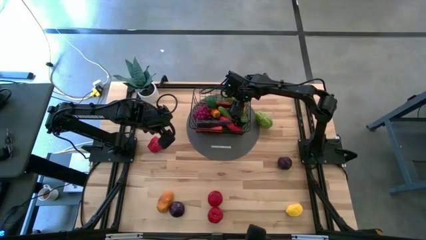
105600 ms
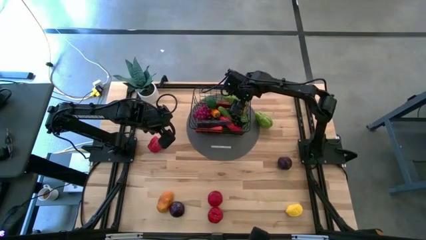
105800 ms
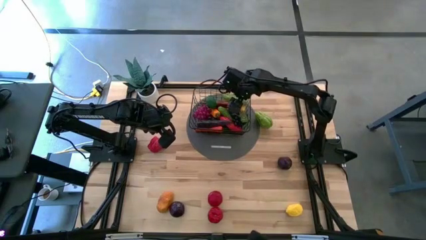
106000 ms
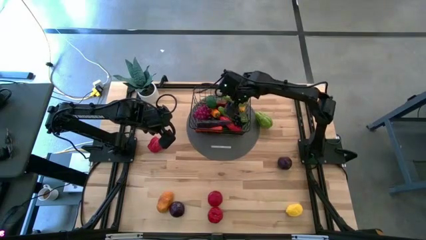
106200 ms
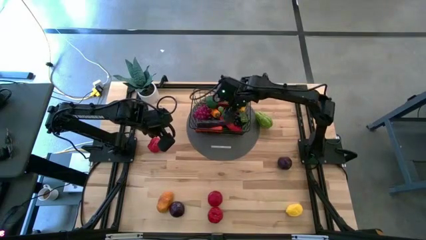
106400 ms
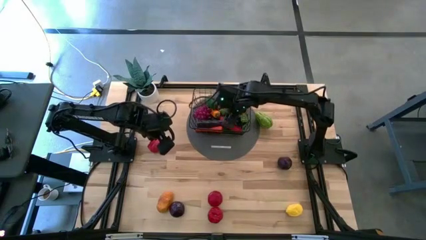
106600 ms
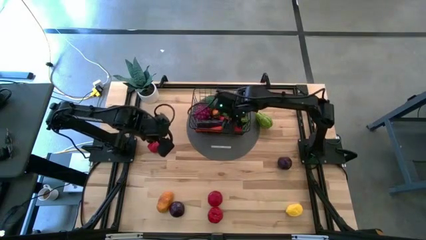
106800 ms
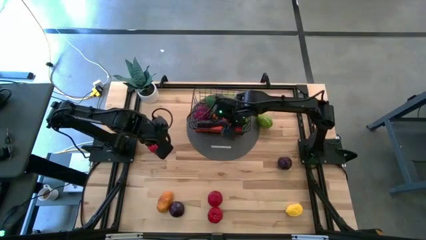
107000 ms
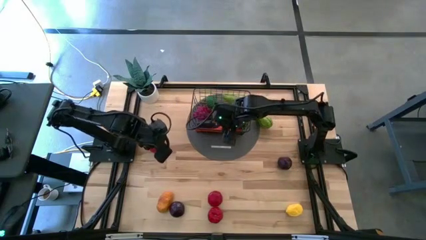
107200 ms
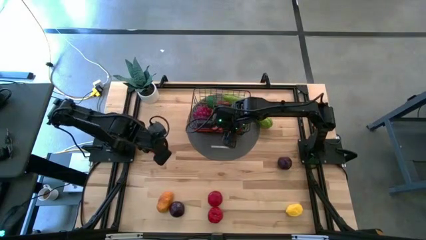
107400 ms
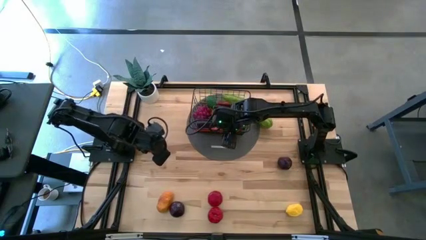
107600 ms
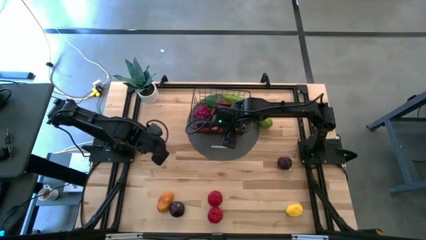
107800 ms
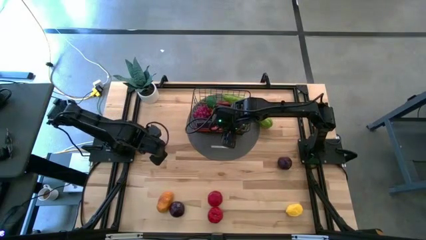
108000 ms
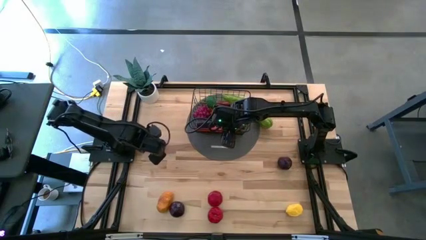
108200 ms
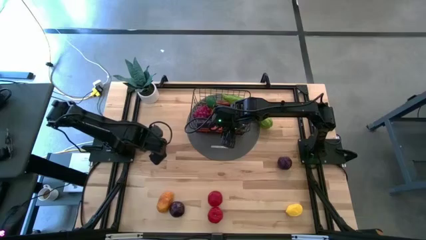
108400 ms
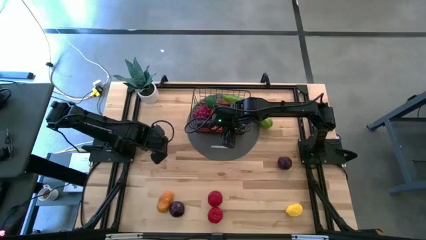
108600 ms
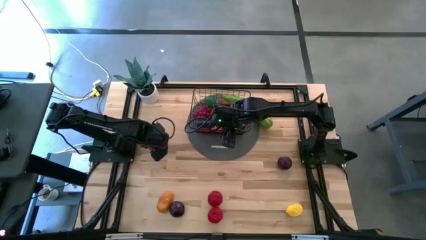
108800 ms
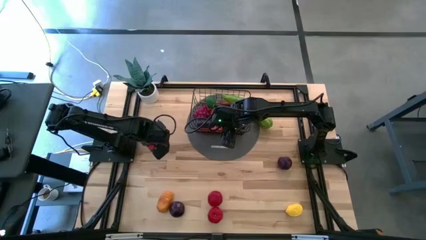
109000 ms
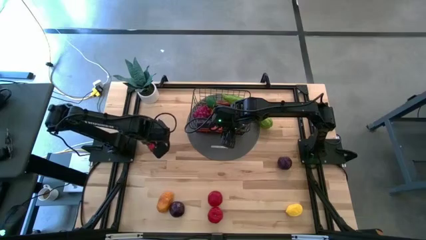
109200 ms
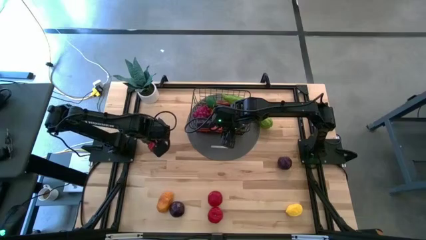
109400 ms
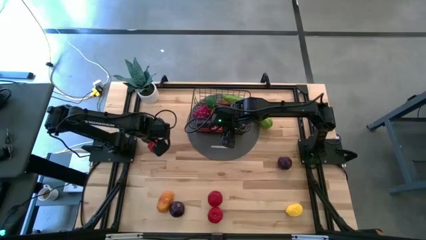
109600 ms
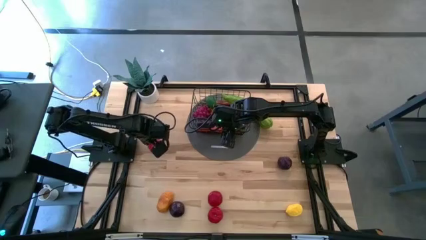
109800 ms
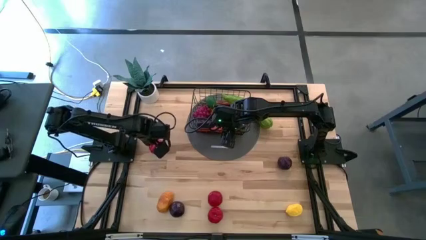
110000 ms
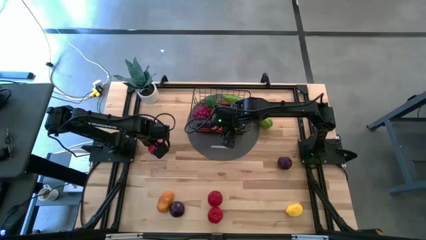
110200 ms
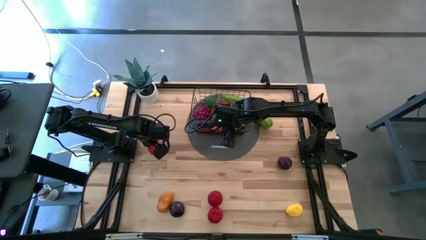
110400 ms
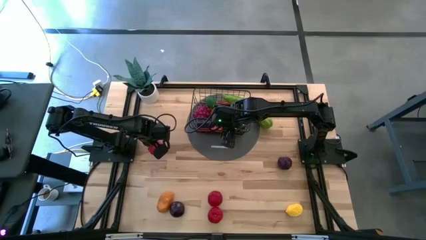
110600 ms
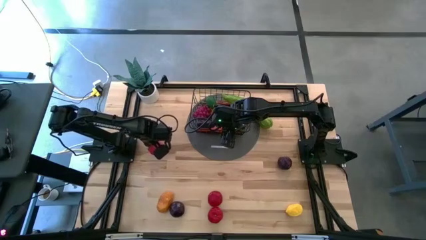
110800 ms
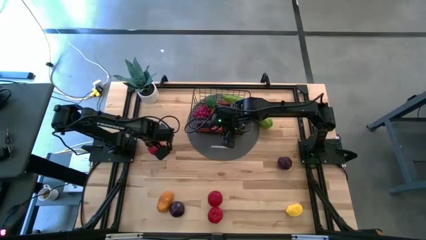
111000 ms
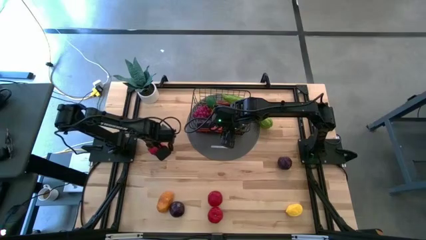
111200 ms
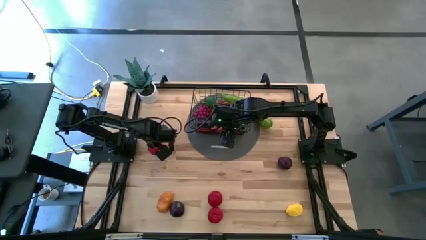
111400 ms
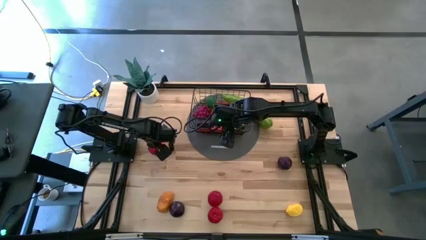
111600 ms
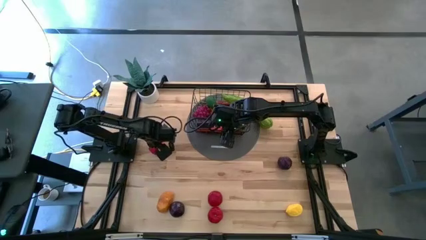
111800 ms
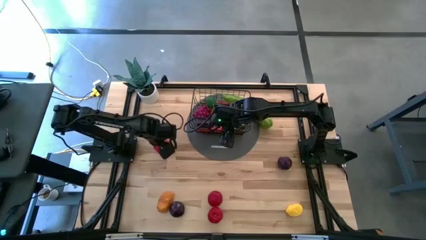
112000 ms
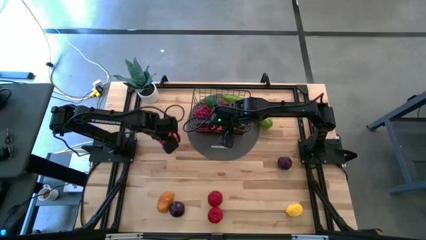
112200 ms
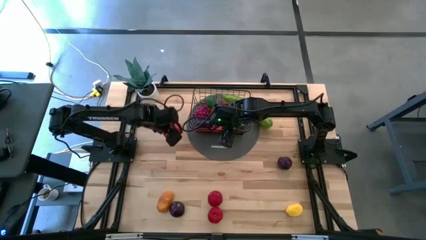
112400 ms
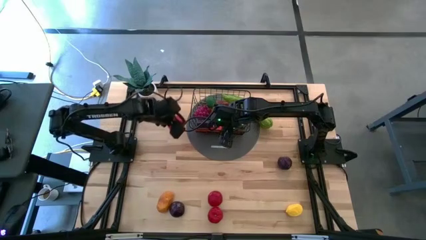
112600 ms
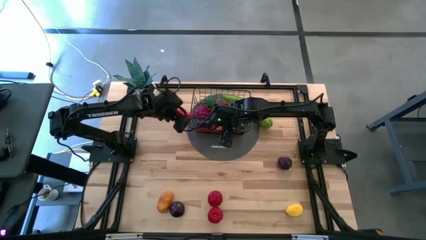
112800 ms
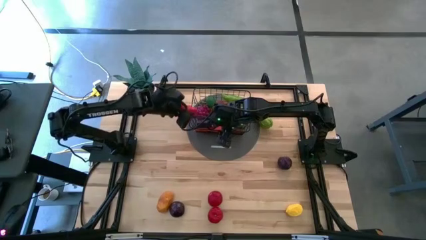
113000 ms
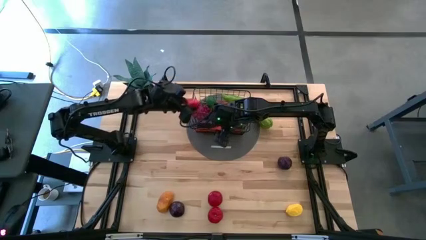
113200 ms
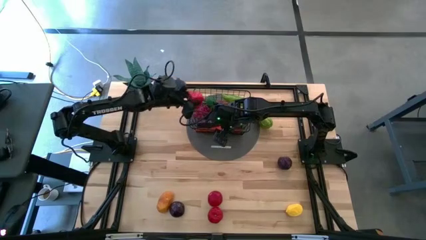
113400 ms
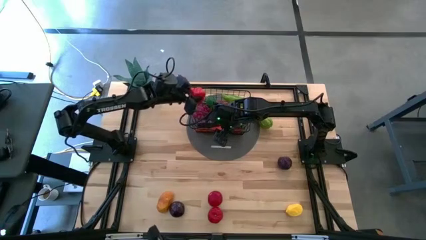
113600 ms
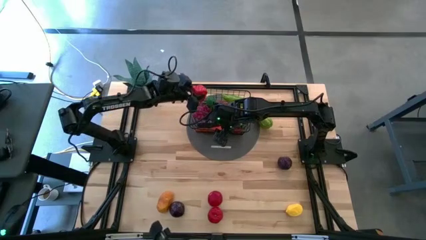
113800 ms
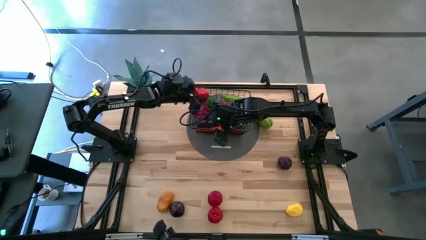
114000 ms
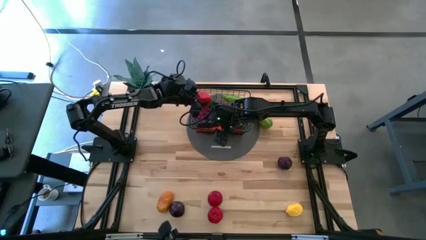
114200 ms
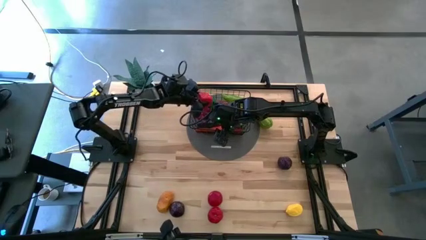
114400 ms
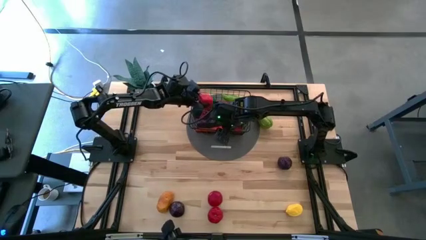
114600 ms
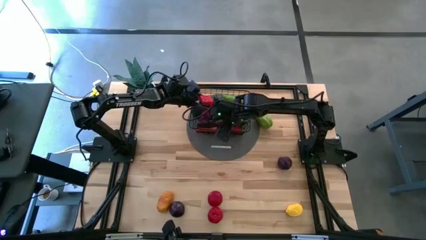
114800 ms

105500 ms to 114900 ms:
Task: Build produce basket
Put the red bell pepper into the wire basket

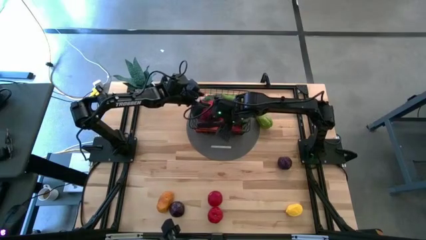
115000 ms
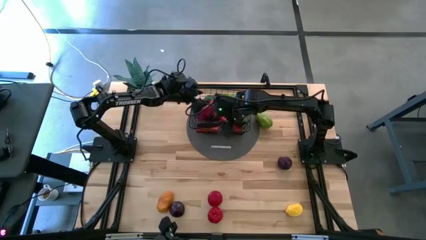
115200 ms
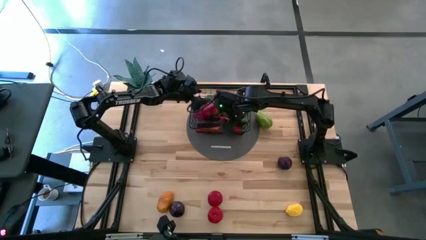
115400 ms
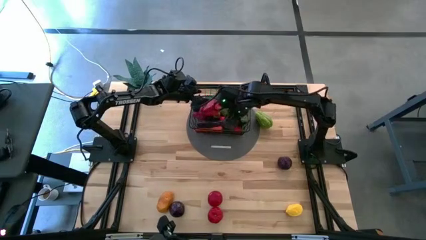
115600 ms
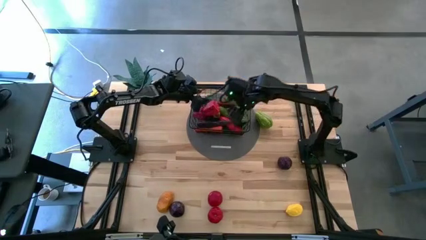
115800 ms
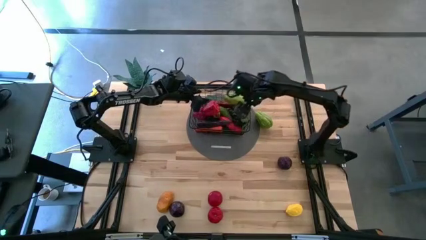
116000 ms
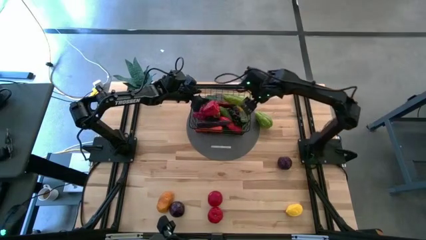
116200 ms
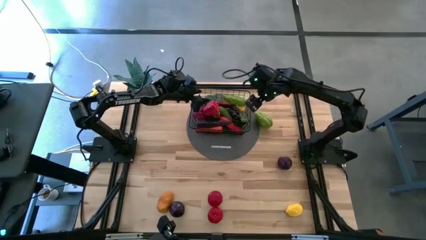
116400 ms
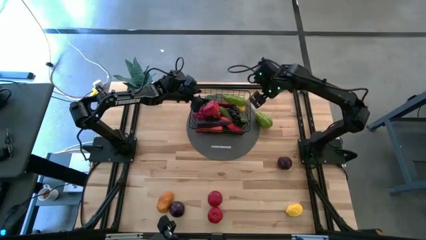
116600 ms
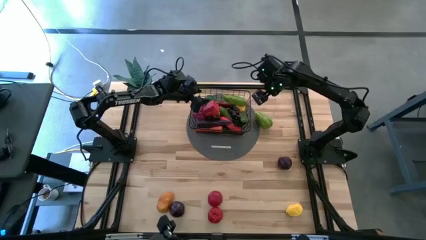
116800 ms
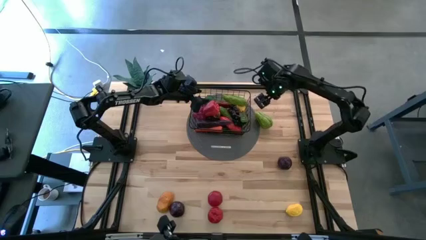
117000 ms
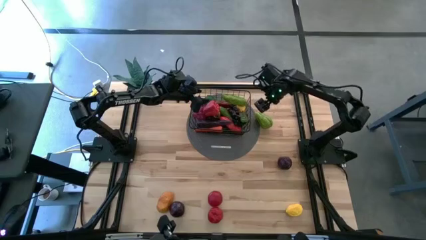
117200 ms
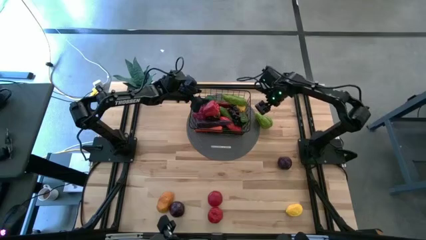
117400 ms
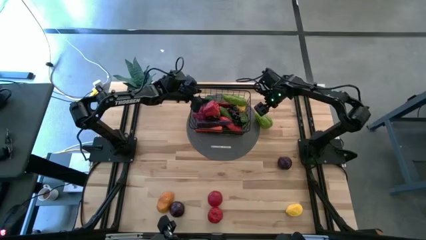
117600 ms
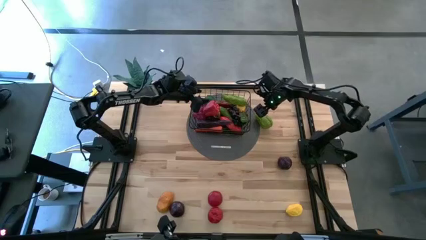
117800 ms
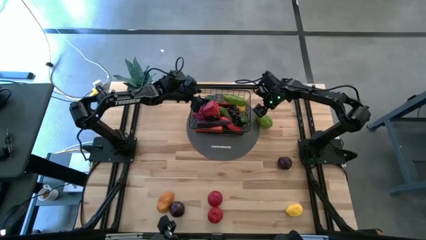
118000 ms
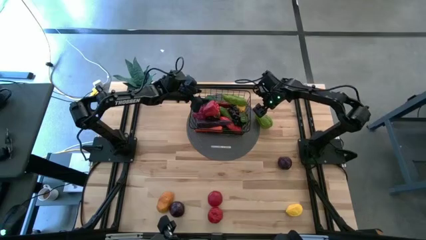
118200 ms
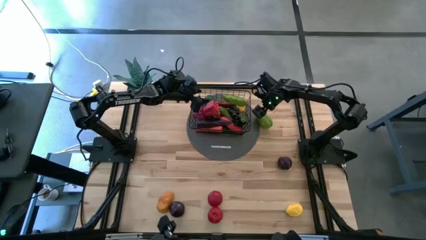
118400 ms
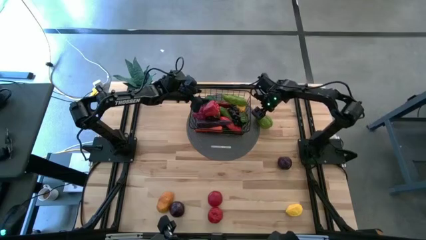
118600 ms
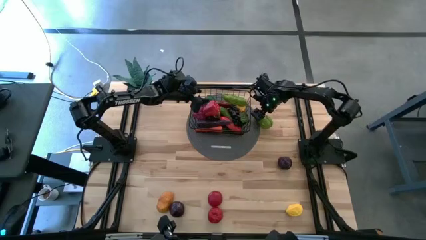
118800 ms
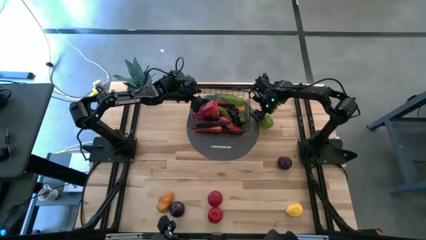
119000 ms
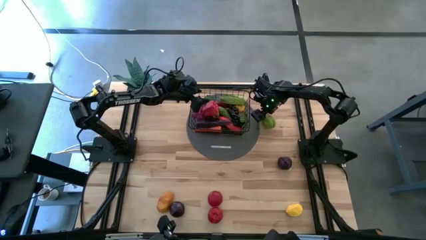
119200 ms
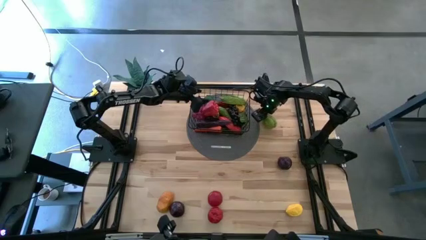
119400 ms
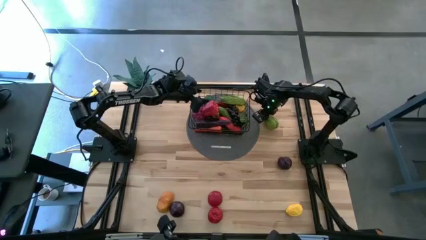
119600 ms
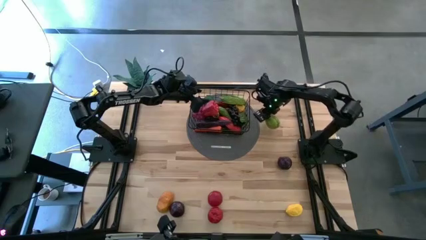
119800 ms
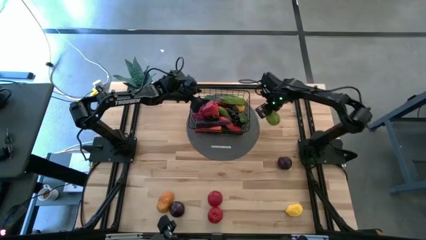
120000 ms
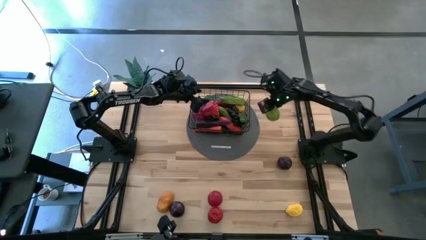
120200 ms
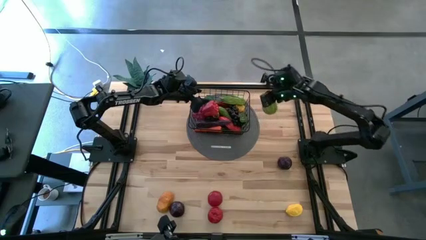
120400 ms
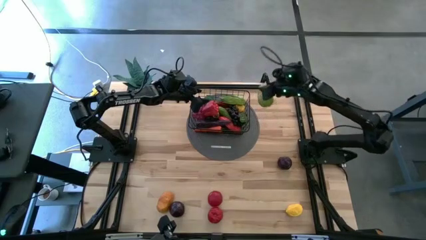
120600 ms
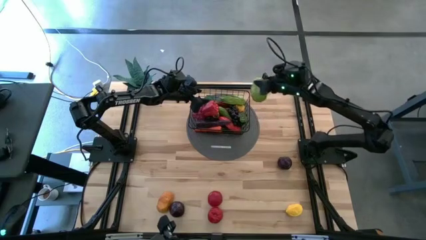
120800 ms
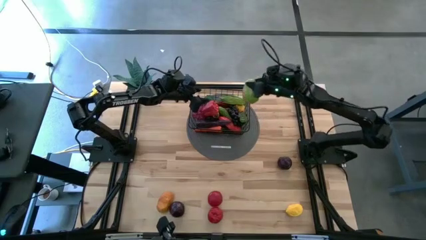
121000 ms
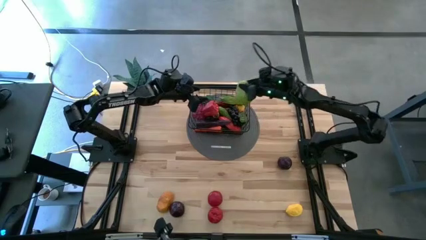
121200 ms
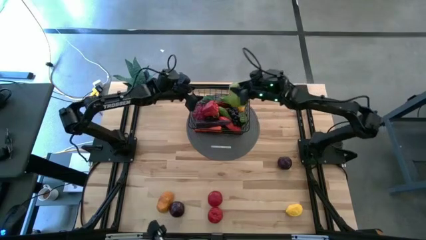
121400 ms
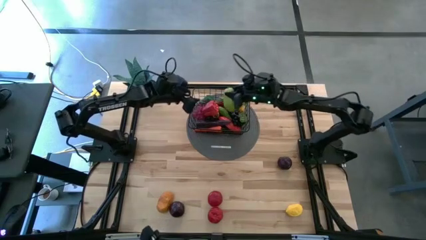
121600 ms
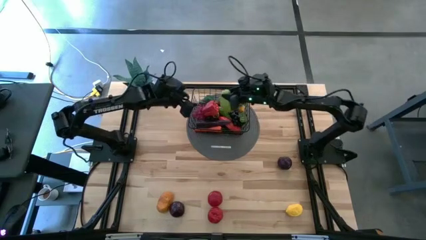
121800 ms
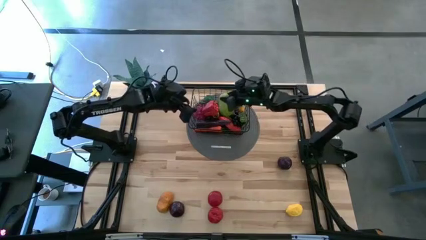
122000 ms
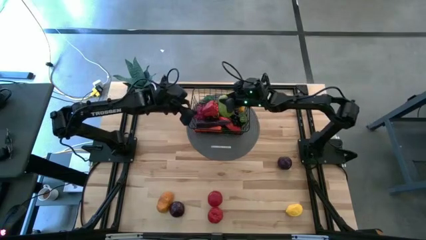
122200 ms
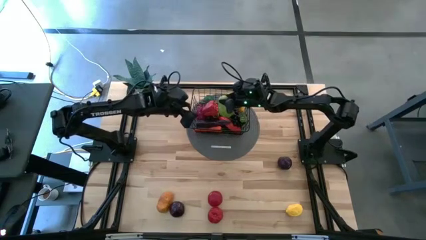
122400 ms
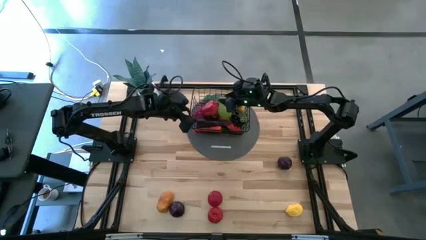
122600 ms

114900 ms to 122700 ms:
Put the green chayote into the wire basket
